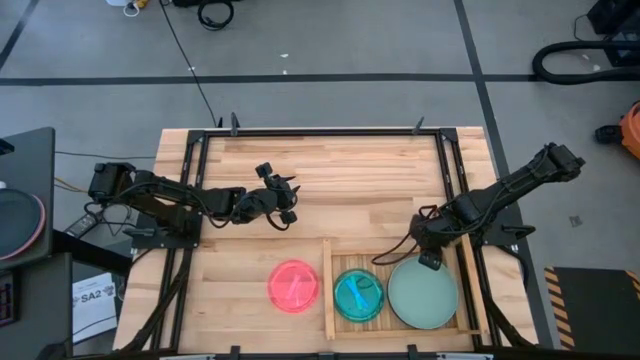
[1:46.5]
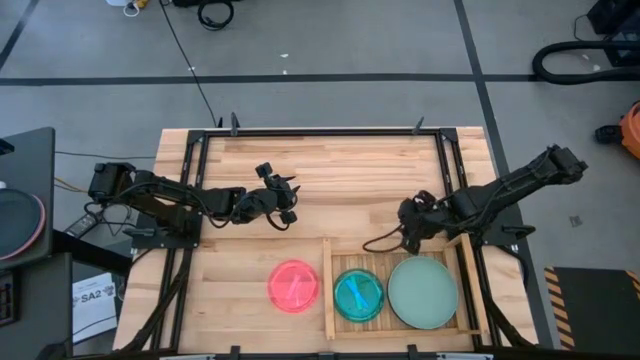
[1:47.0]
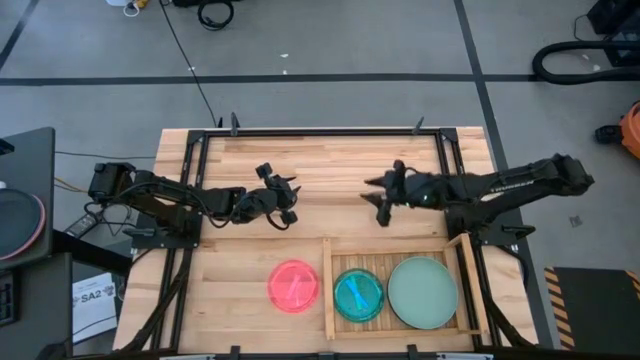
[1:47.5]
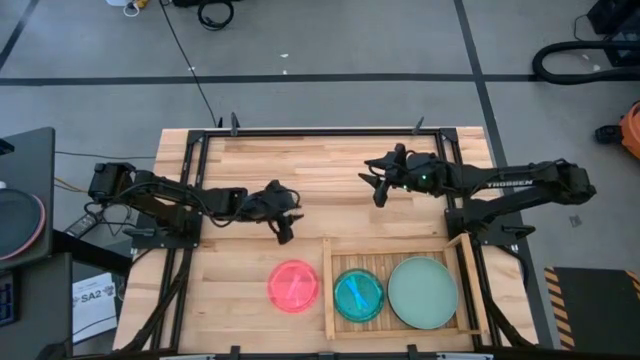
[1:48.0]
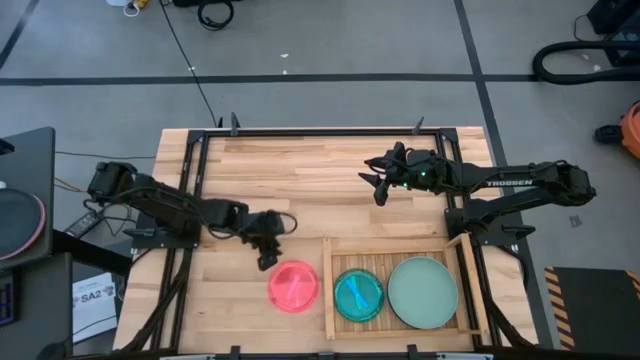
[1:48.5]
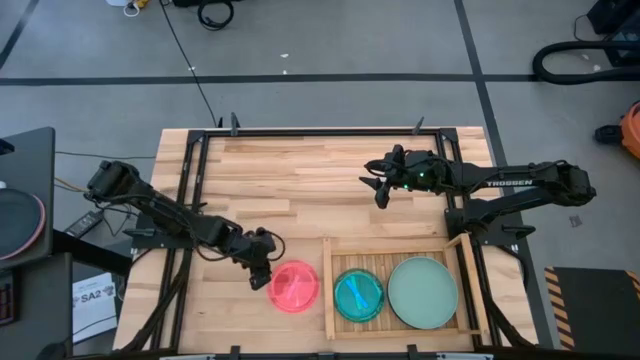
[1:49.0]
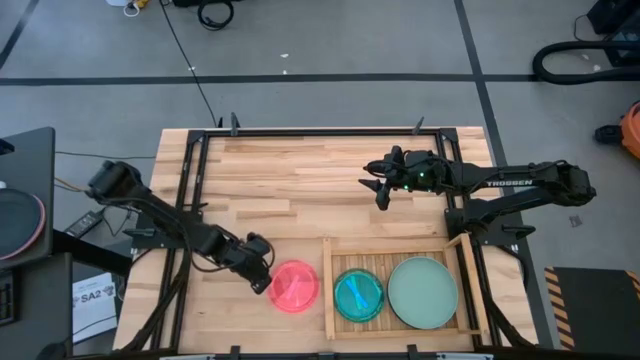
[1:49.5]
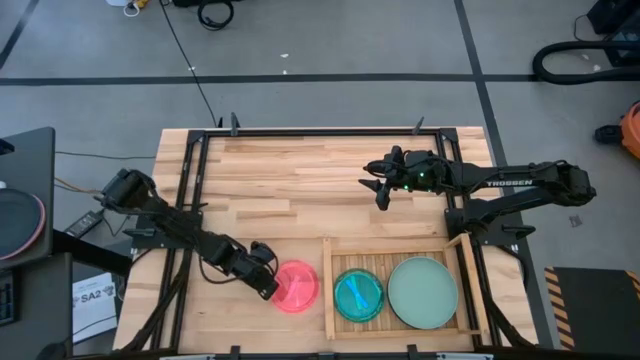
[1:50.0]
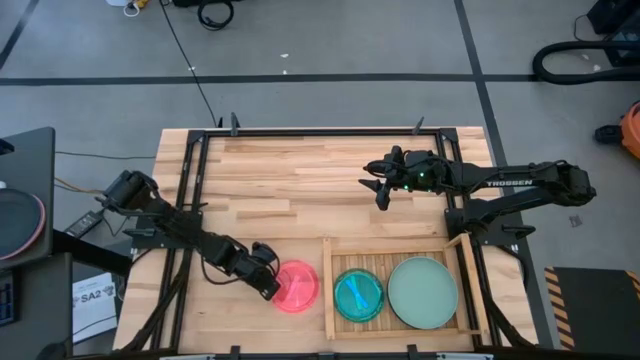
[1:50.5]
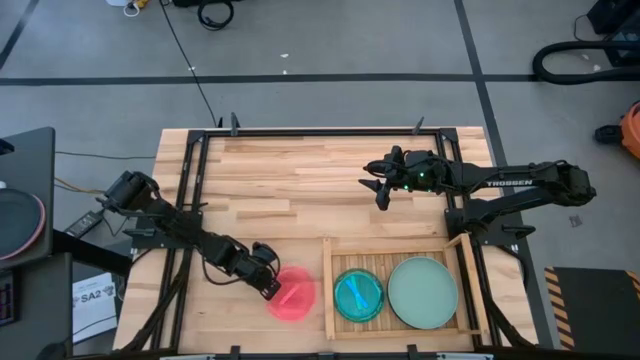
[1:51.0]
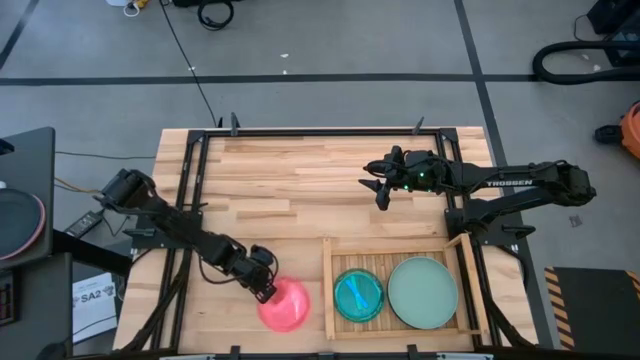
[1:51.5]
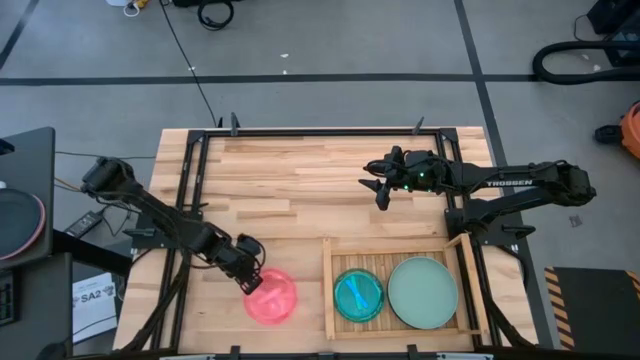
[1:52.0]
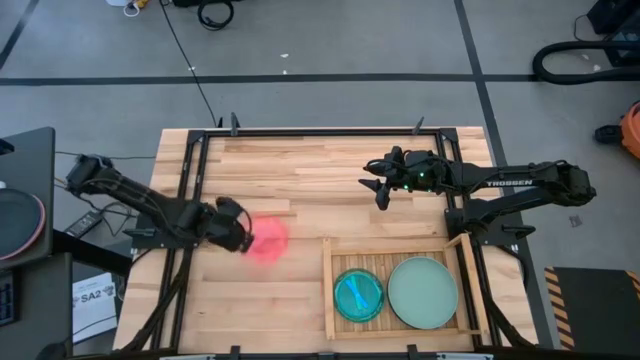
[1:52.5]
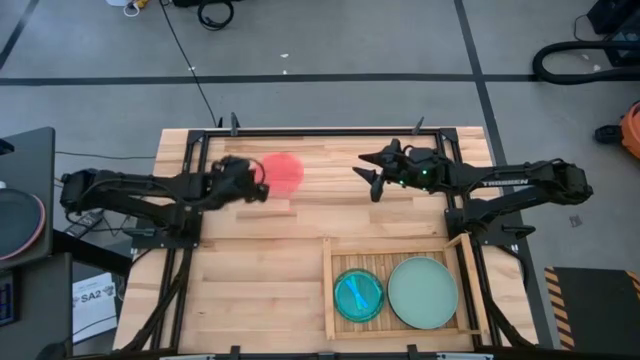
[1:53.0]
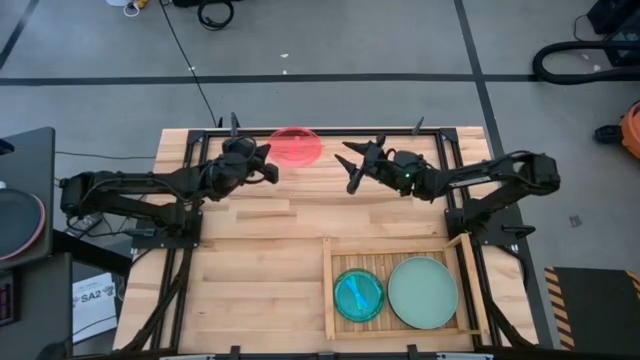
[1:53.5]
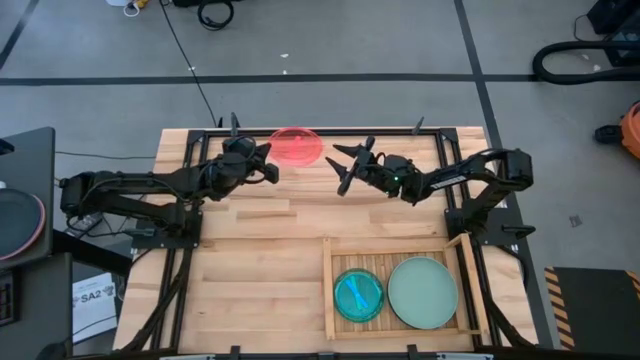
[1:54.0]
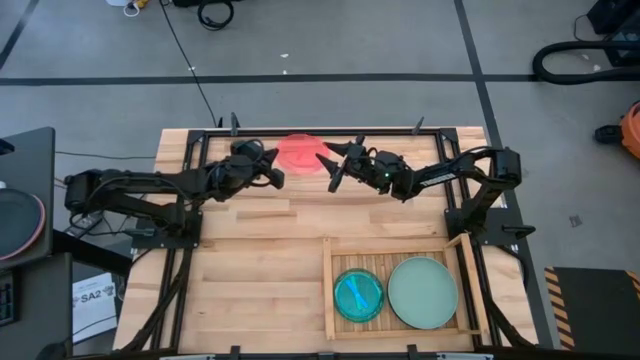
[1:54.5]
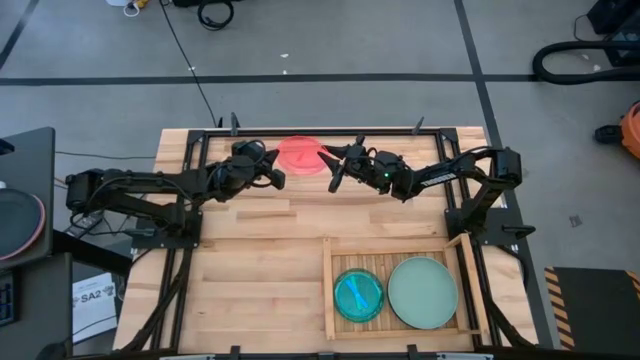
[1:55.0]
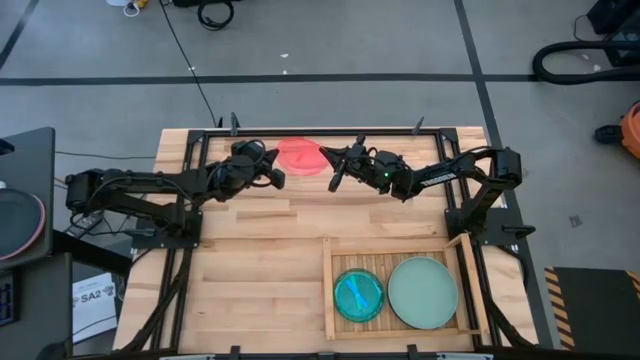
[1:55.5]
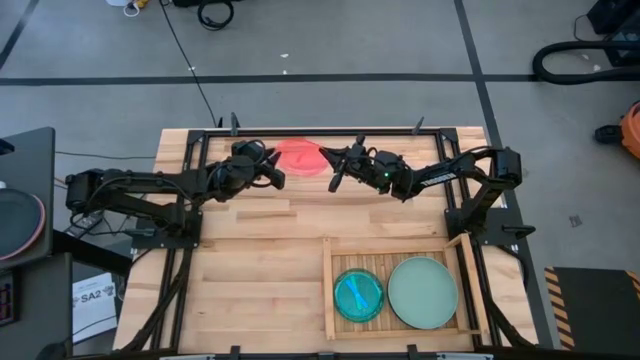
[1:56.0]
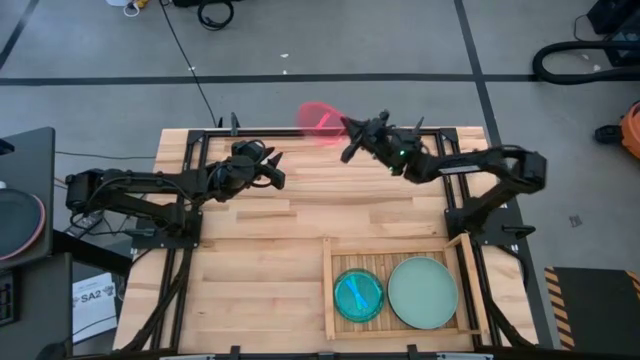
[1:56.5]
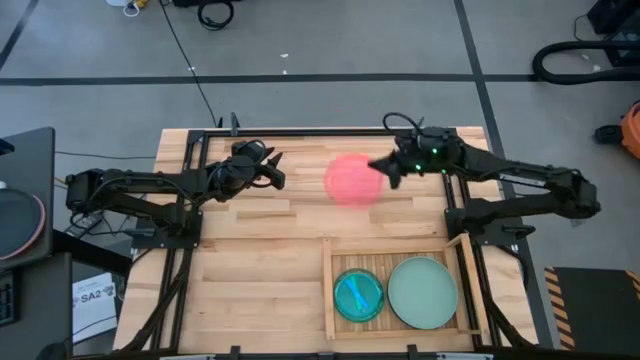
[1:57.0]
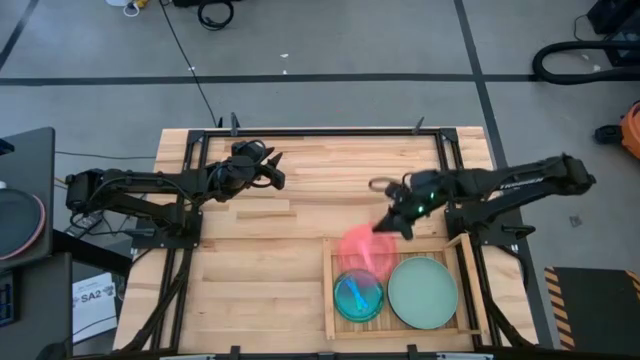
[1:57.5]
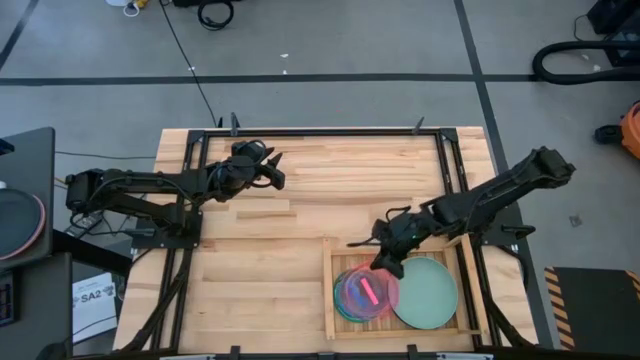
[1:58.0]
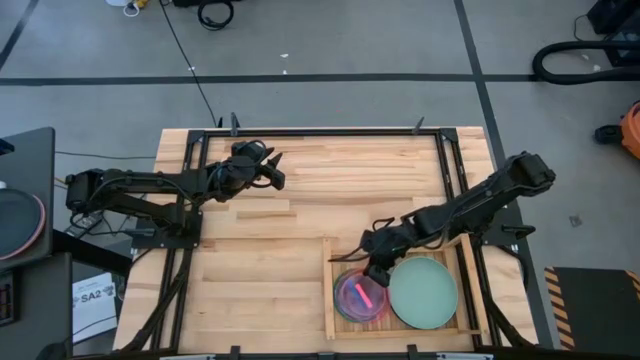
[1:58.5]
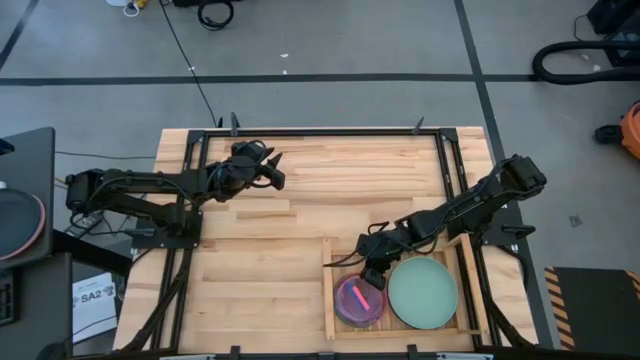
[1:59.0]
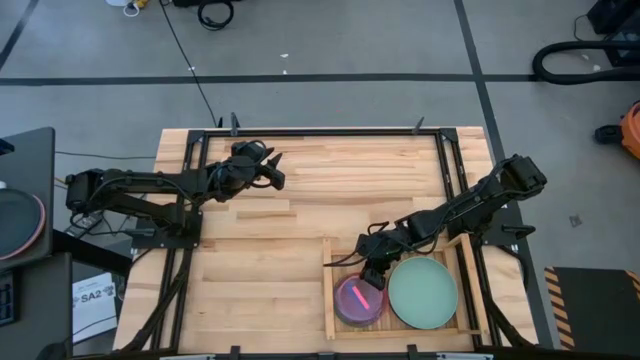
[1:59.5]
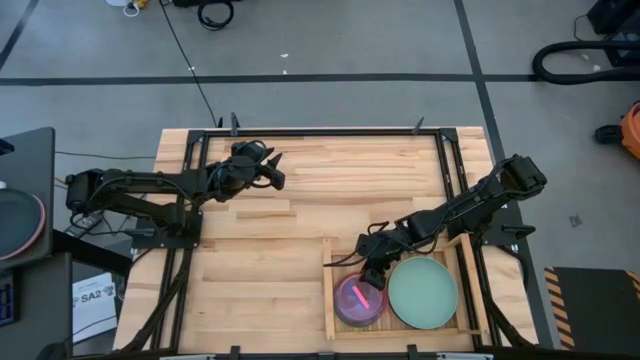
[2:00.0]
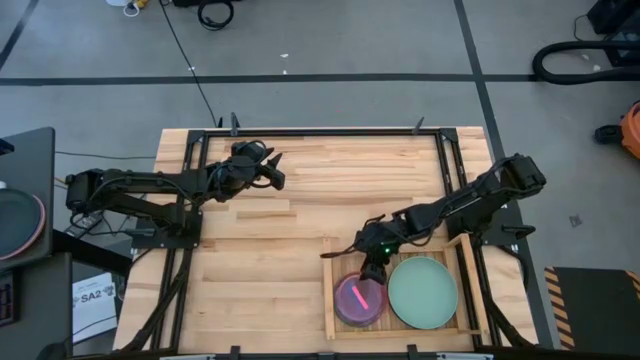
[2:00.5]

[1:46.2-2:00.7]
Task: Place and stack plates onto a shelf
Stack the pink plate on the blue plate on the shelf

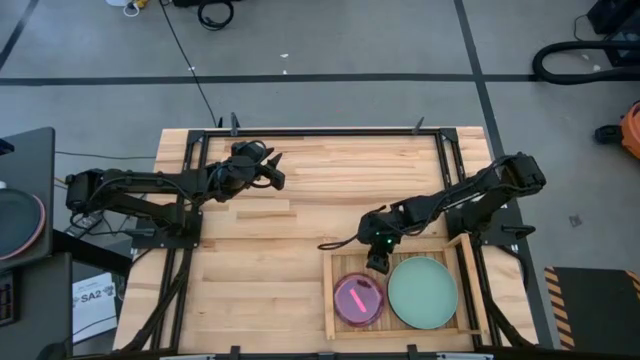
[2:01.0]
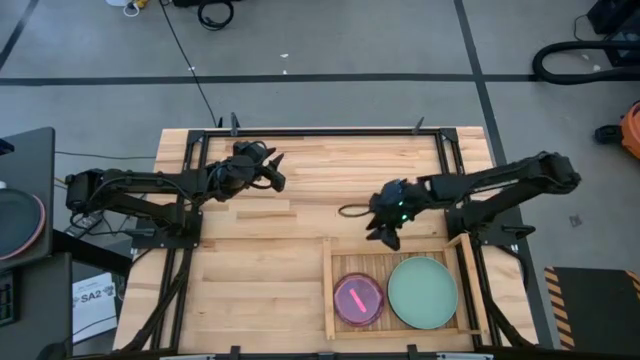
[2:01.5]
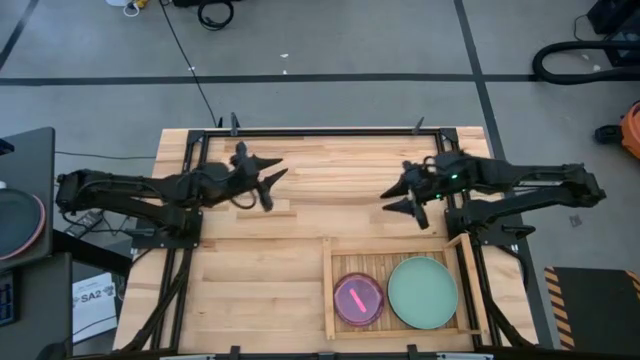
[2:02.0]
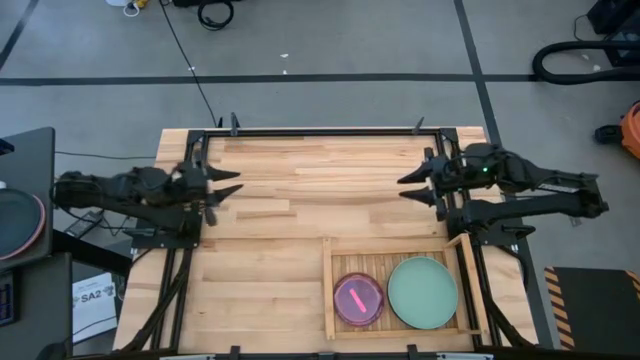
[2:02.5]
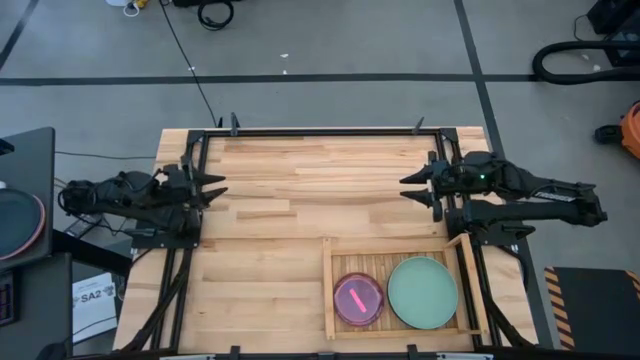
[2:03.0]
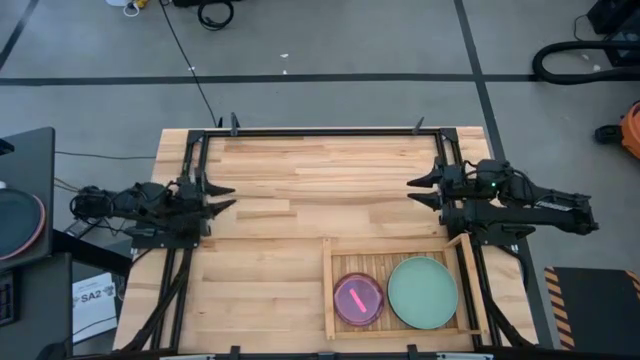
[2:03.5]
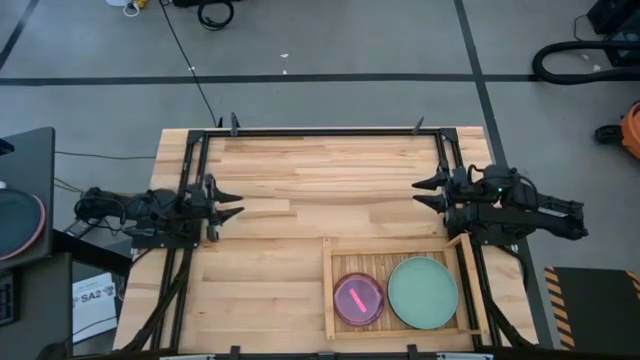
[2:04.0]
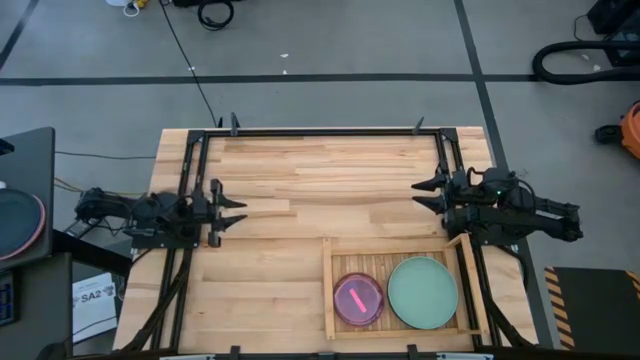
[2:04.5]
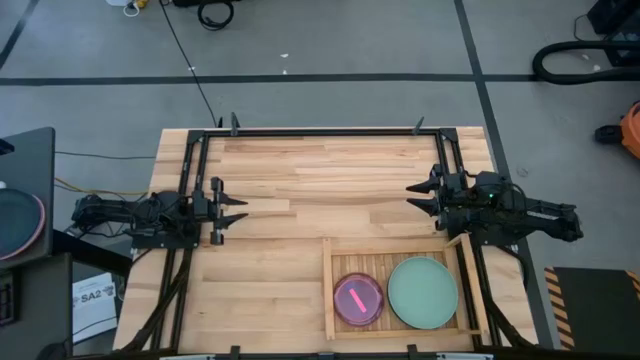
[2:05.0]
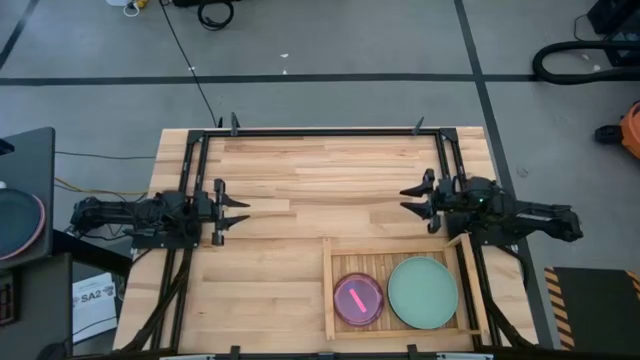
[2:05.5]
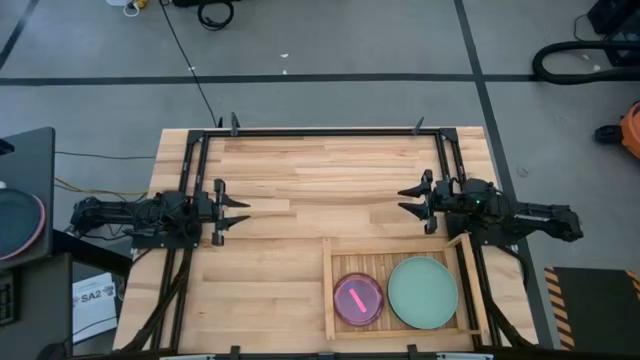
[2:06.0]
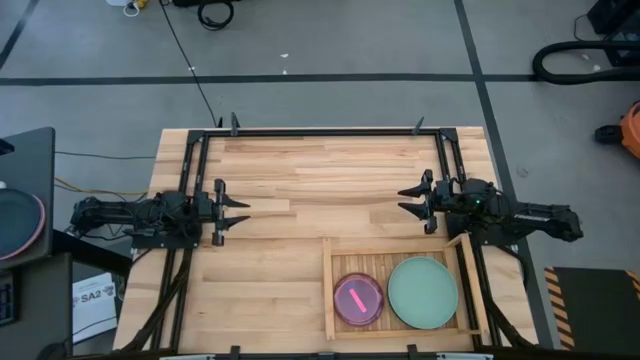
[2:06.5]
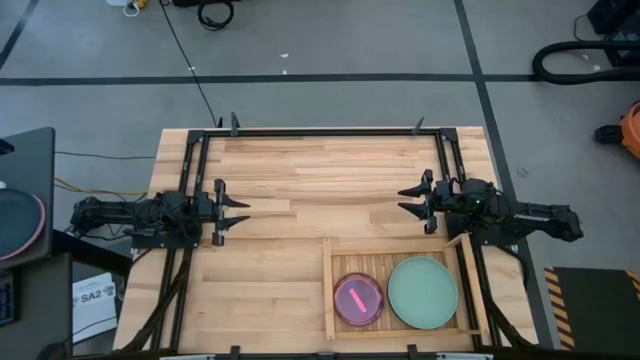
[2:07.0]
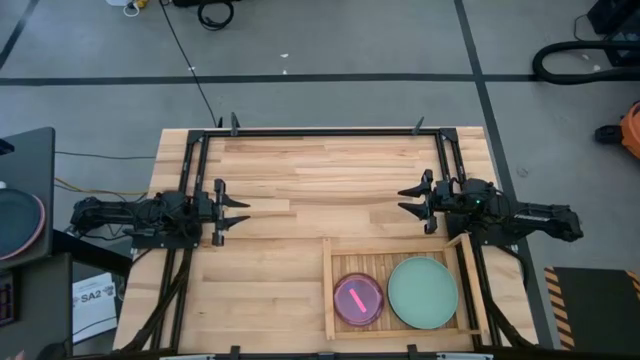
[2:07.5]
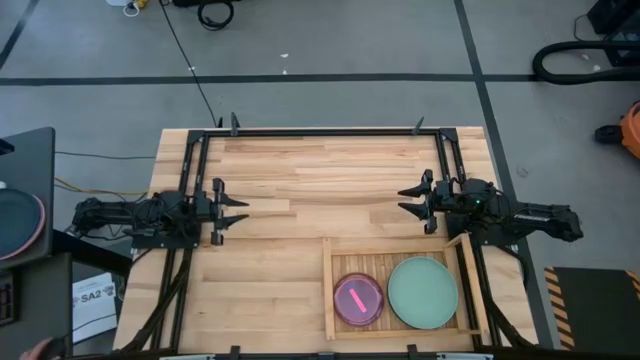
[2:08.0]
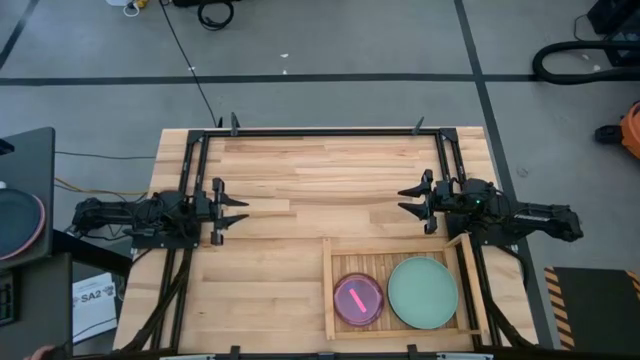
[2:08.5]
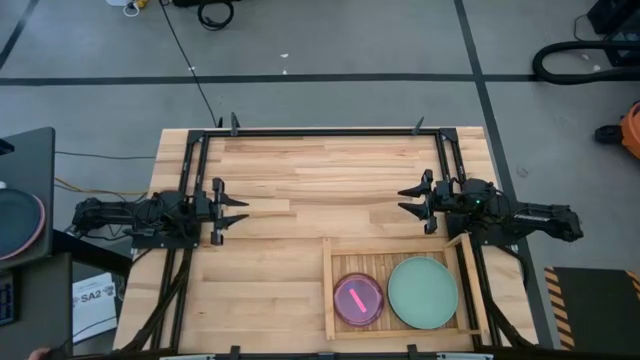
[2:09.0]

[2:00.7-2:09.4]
Return to Home Position
